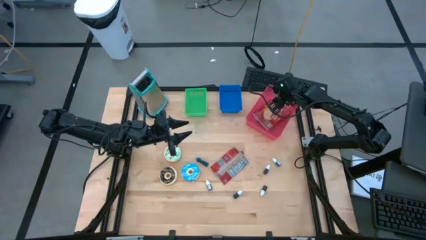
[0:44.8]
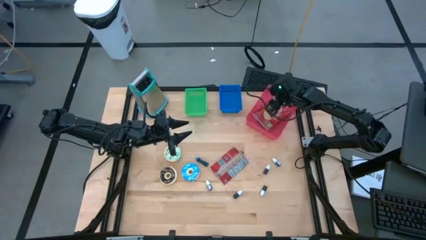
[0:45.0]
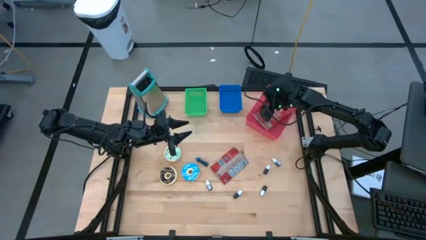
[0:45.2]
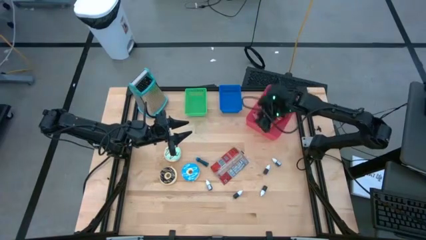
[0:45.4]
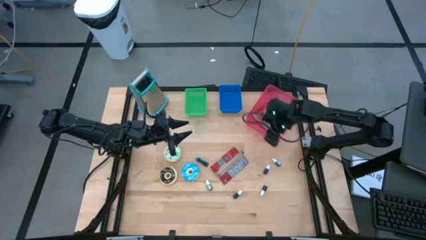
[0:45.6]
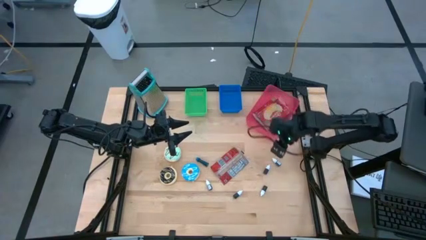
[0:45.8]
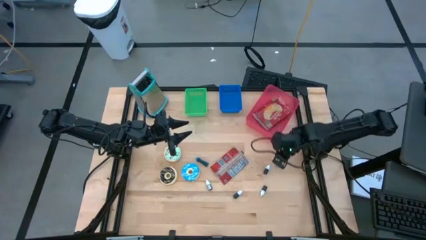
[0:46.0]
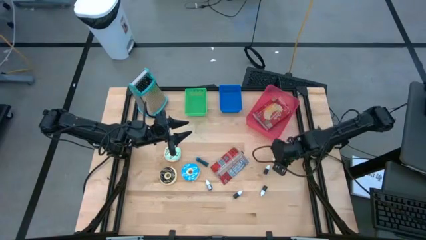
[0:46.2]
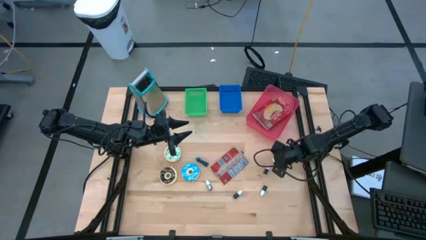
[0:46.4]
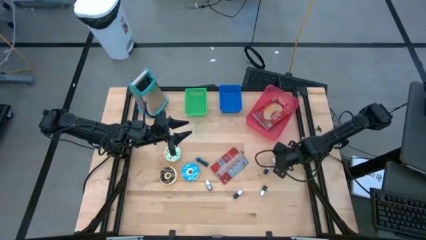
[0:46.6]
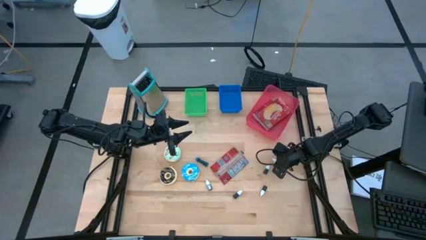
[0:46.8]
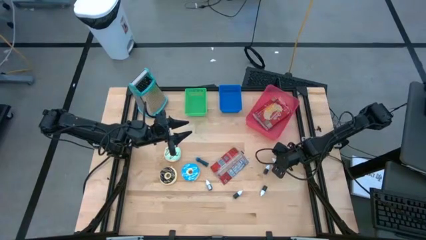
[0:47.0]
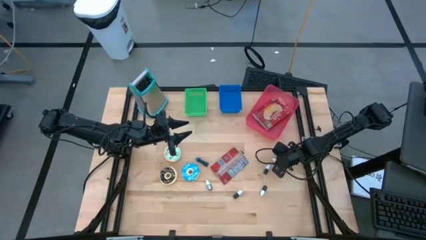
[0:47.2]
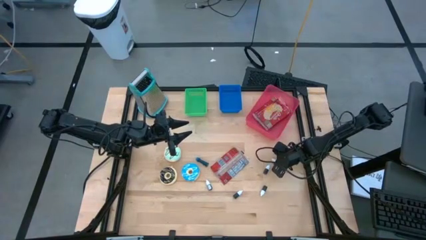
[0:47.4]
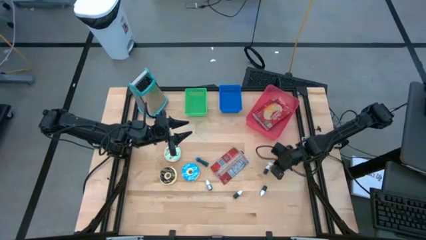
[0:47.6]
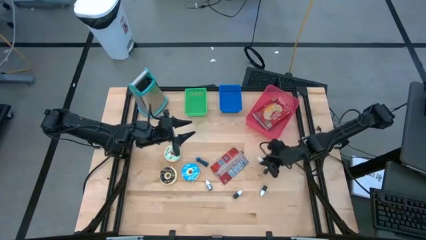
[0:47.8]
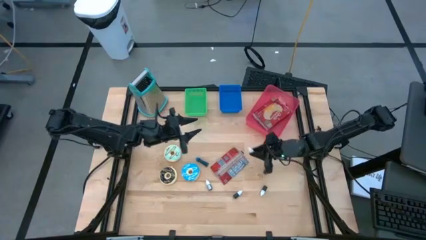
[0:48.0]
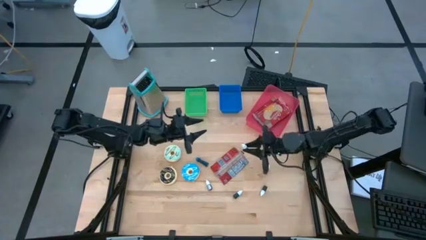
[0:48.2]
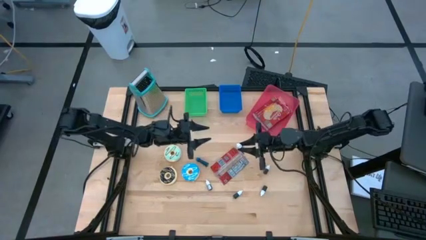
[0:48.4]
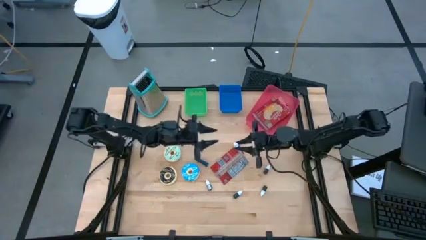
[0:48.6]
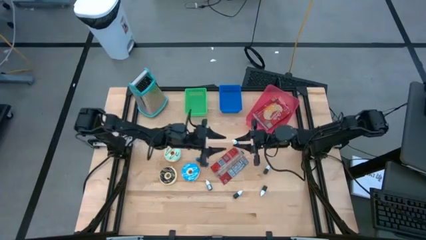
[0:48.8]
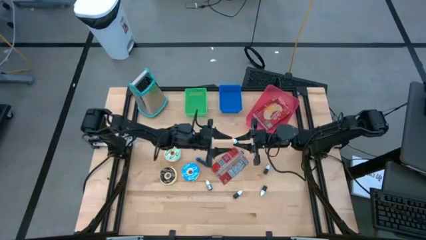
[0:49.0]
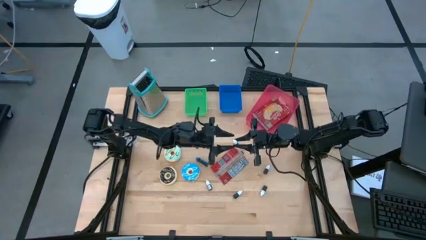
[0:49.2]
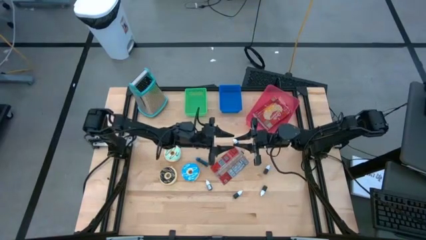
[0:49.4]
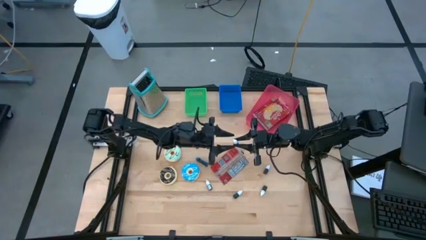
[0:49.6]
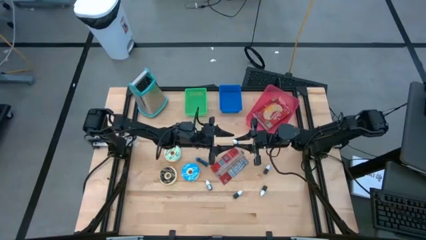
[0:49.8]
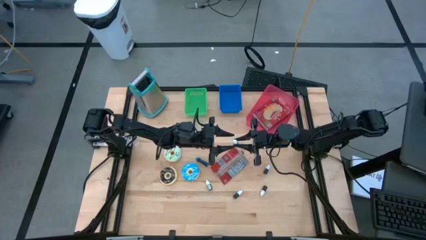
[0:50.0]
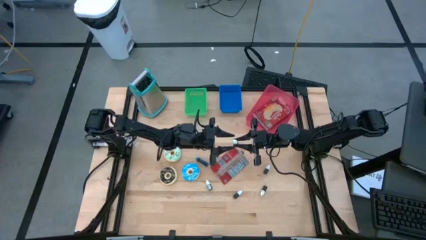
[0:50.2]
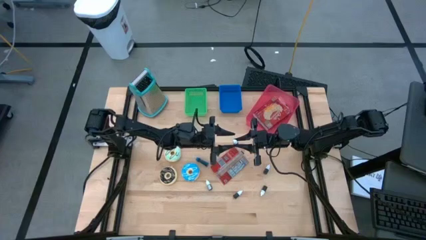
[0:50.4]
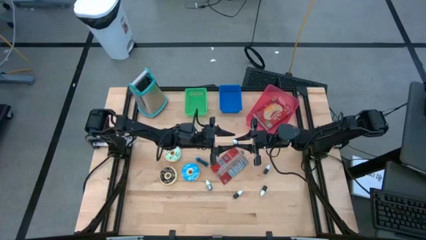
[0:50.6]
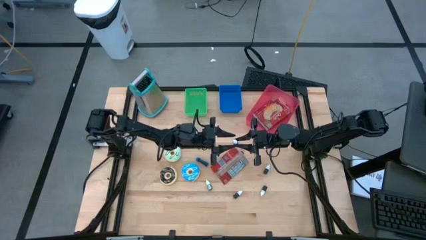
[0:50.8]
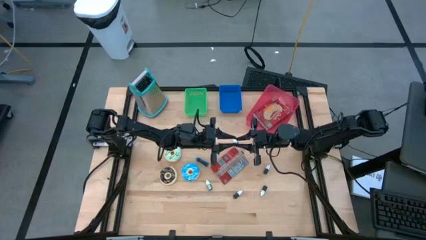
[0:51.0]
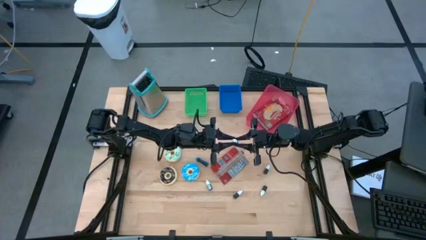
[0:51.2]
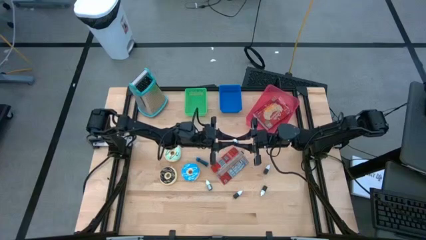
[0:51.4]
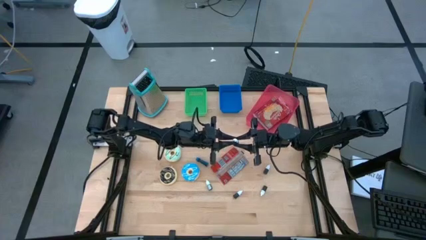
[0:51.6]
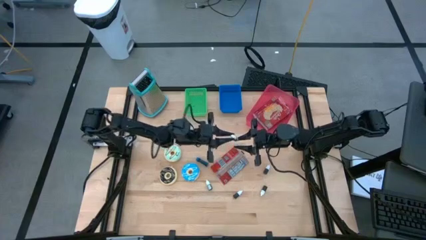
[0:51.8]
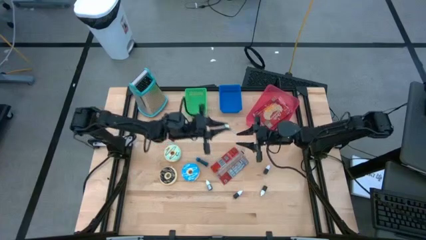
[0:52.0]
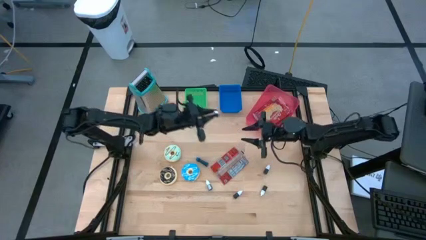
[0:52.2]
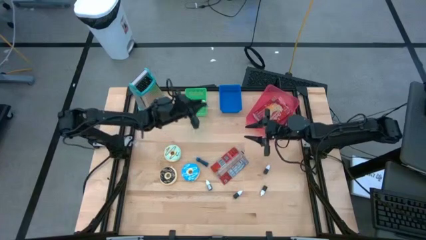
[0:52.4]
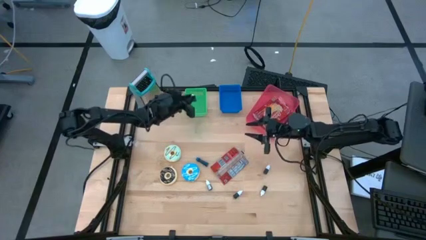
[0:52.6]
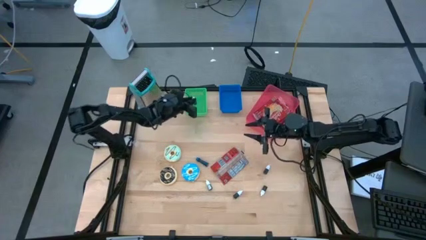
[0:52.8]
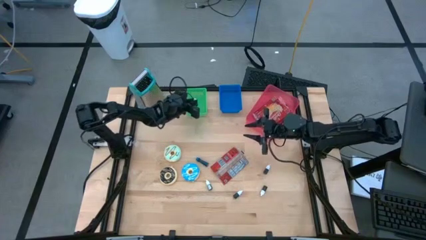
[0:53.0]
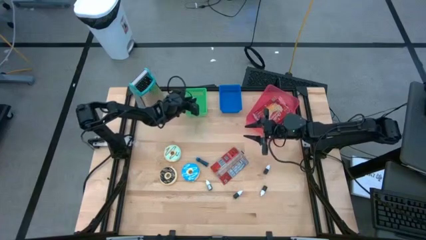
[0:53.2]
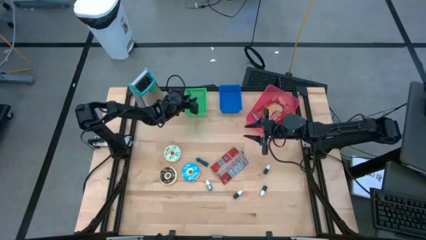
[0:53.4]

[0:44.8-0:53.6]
Put the left blue food coloring bottle into the green bin

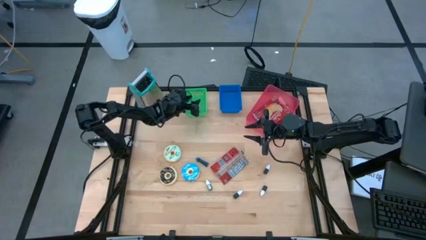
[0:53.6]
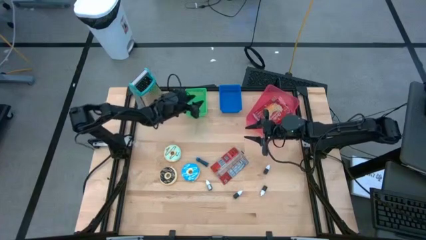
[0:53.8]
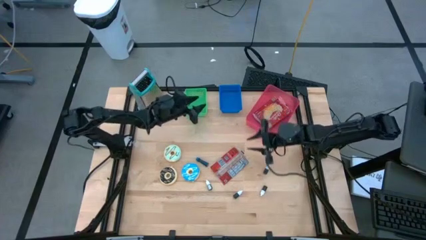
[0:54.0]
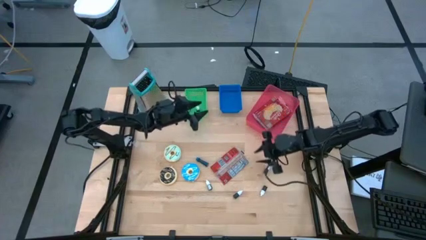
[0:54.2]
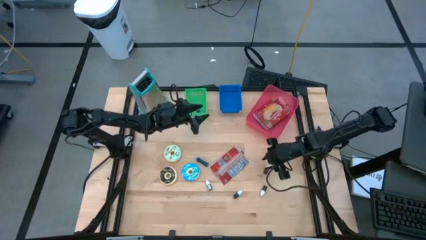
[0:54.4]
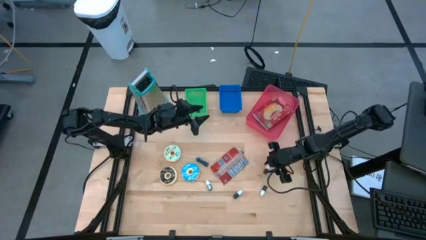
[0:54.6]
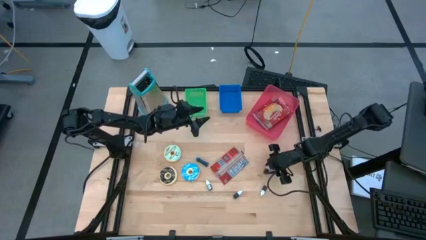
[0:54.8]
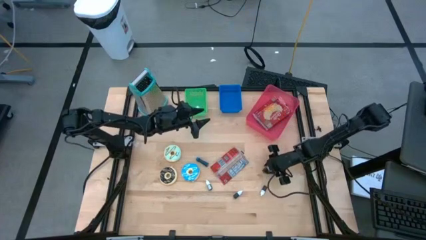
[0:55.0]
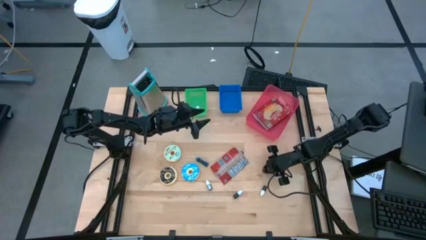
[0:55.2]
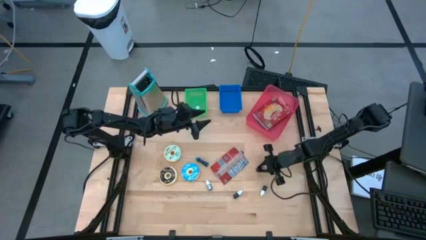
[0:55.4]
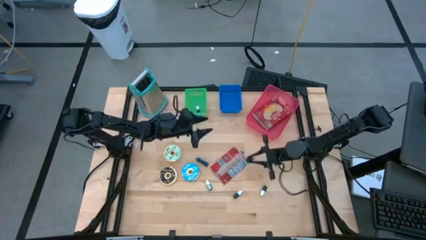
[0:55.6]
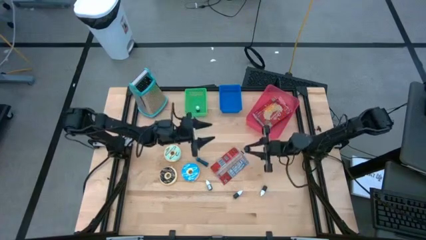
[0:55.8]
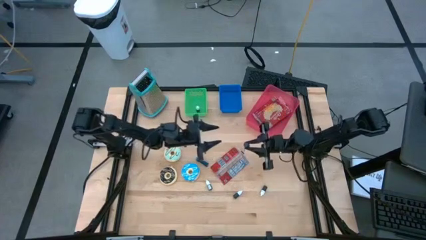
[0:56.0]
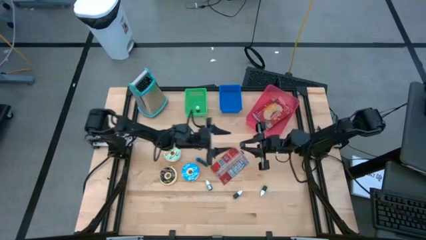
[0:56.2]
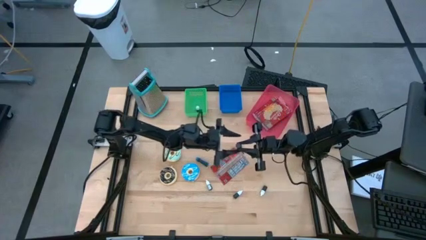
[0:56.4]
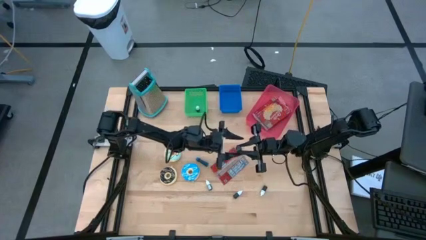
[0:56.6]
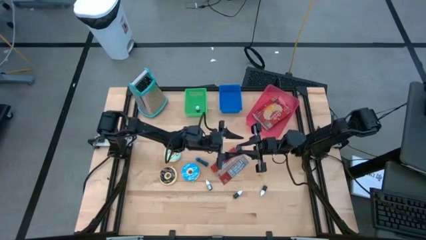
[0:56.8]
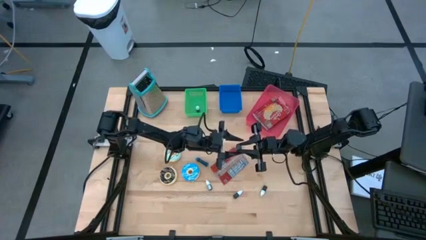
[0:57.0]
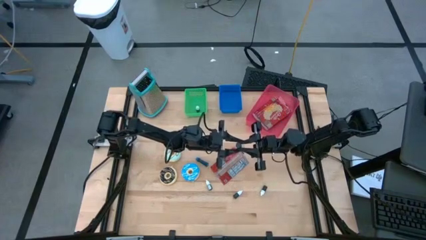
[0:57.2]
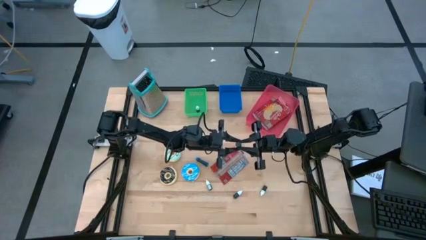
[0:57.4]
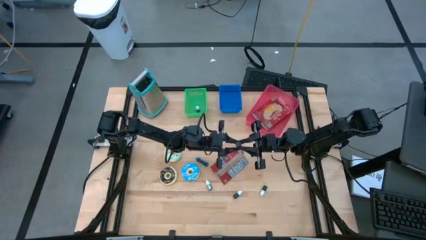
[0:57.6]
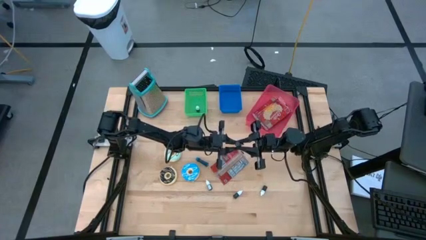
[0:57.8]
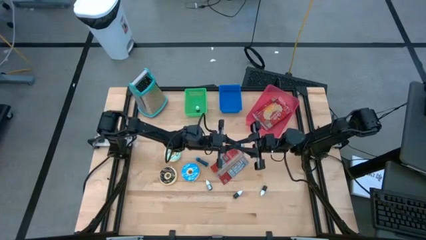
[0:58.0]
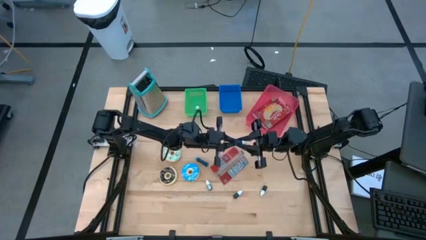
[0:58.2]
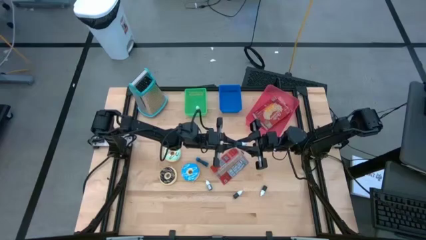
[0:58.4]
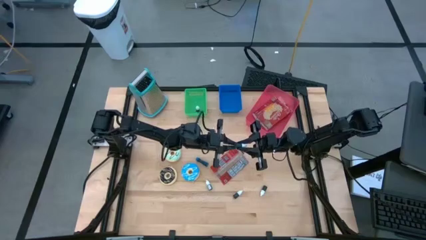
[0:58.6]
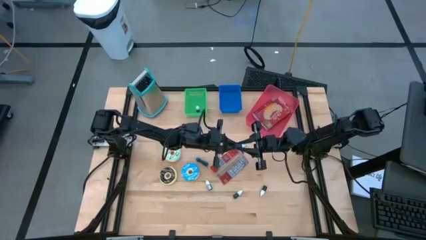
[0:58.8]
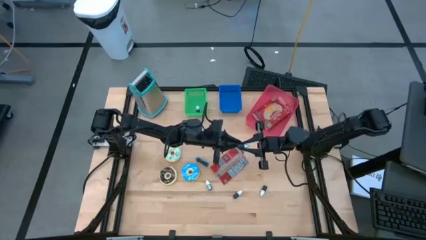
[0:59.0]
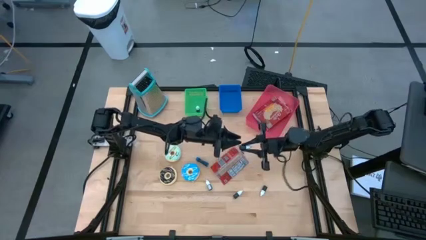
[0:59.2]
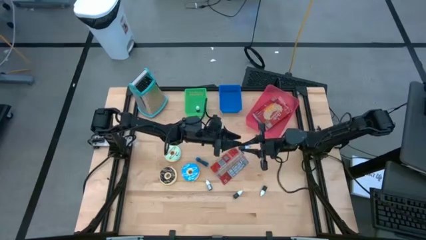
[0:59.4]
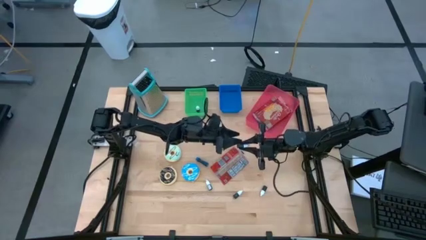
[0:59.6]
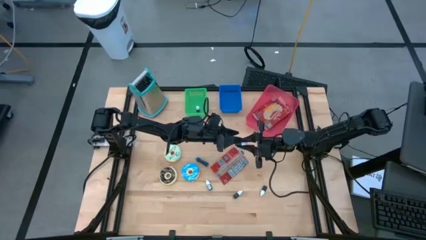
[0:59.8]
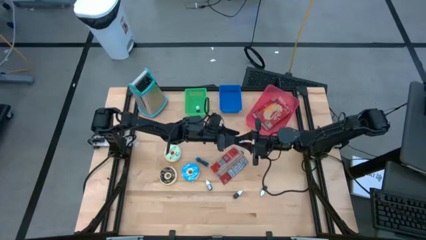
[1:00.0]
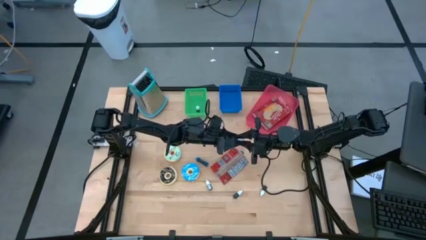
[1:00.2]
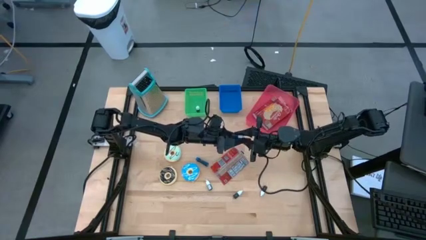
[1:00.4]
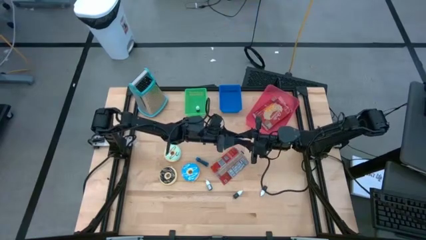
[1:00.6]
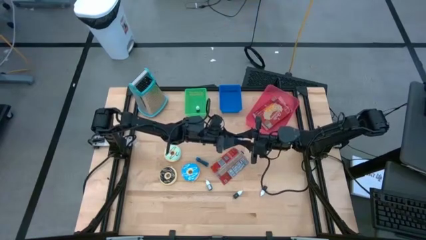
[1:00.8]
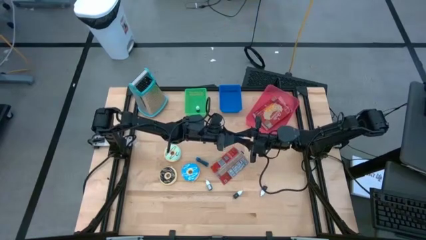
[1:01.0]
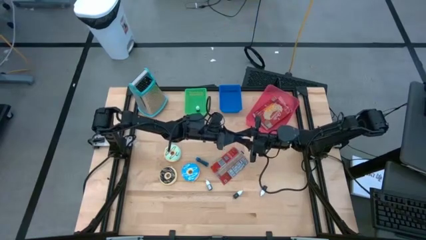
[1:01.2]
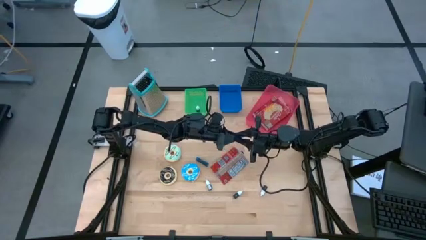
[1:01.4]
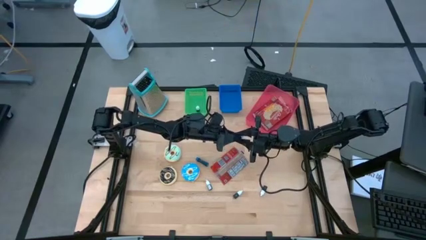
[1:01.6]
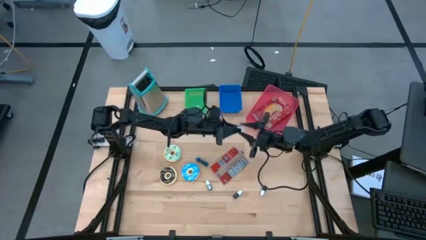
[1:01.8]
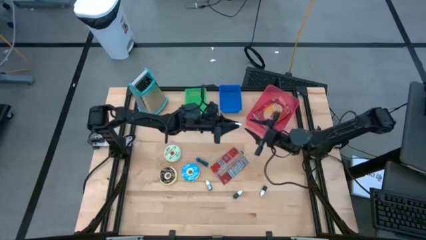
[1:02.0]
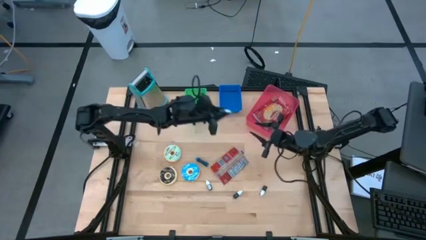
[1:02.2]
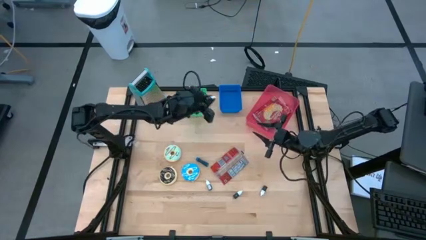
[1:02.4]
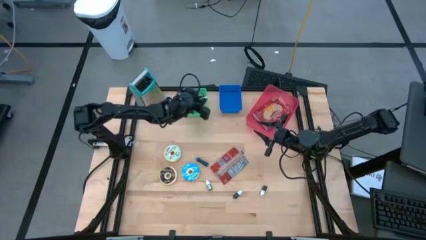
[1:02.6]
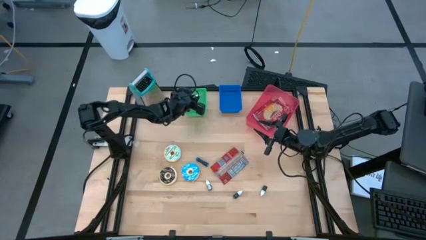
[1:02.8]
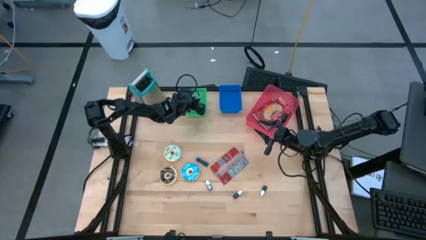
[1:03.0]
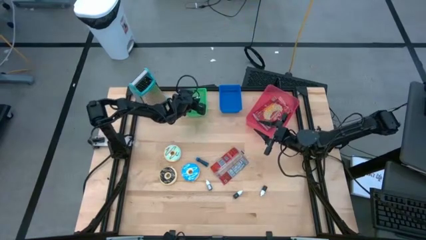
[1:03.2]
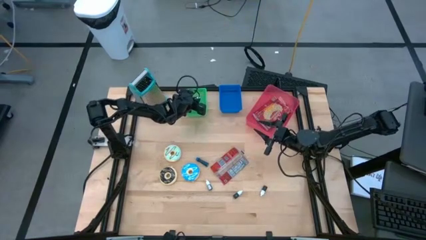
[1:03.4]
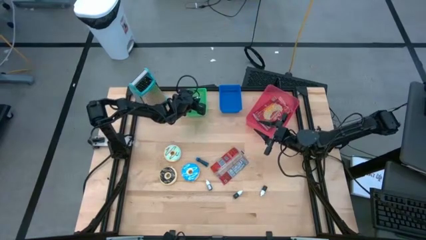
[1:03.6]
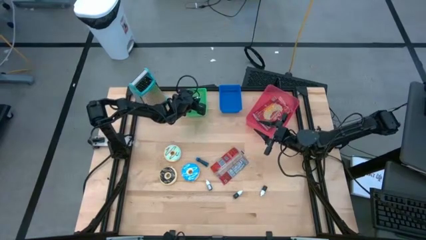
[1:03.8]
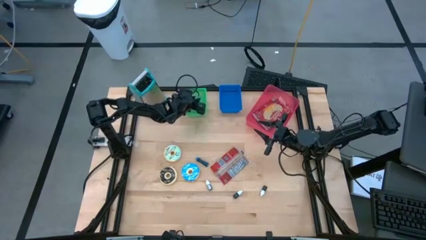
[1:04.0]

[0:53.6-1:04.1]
Put the top black food coloring bottle into the green bin
